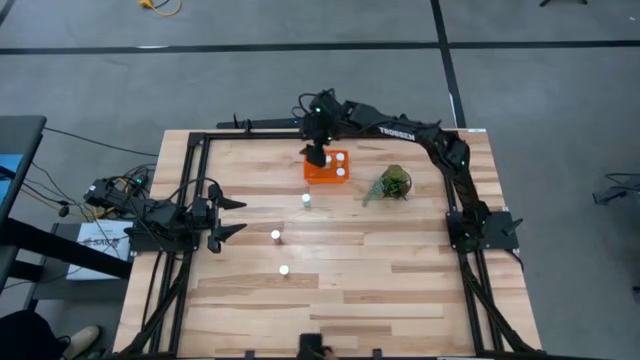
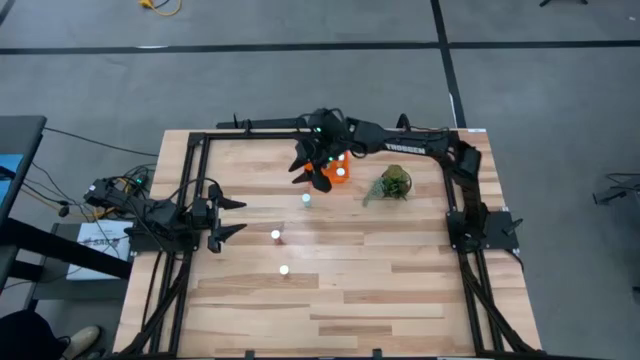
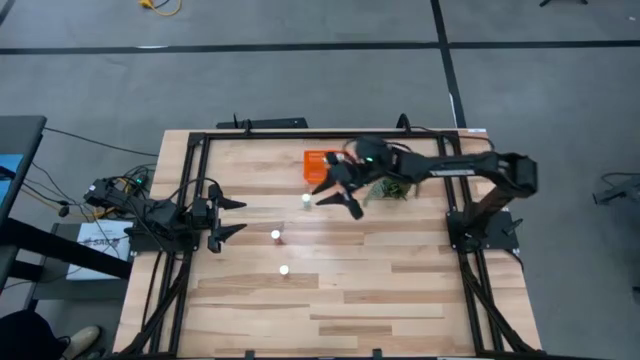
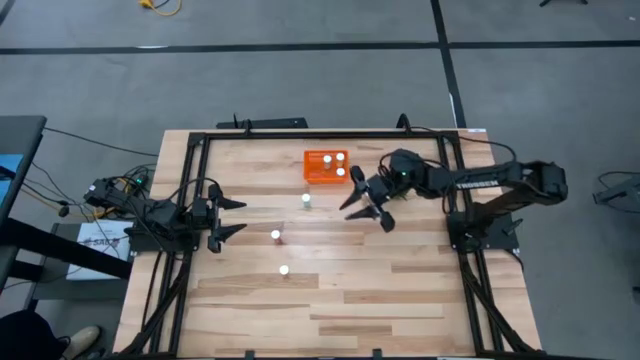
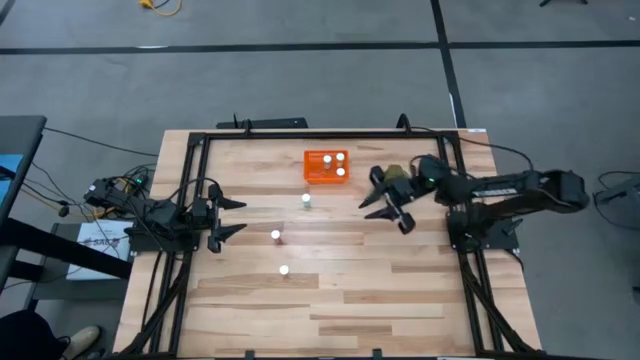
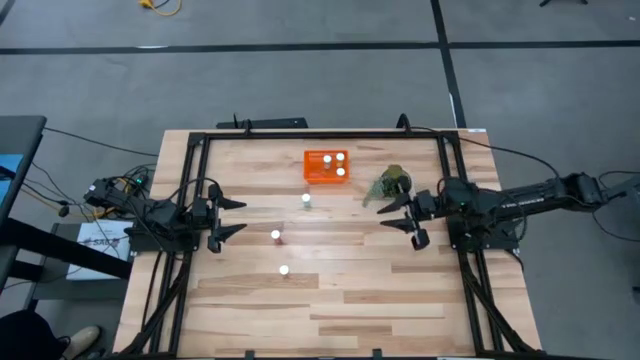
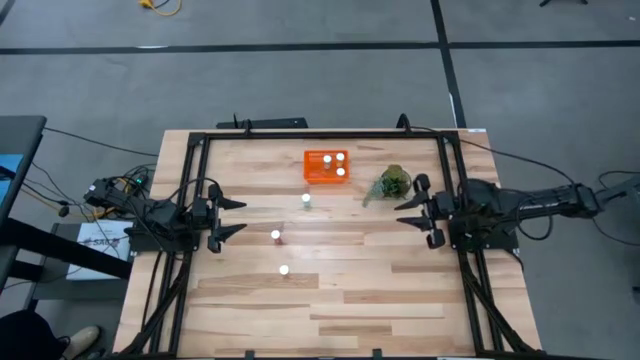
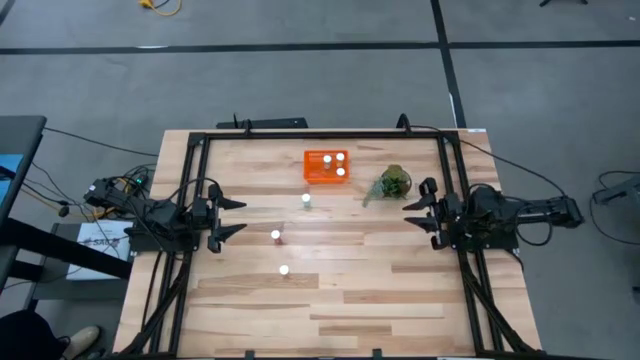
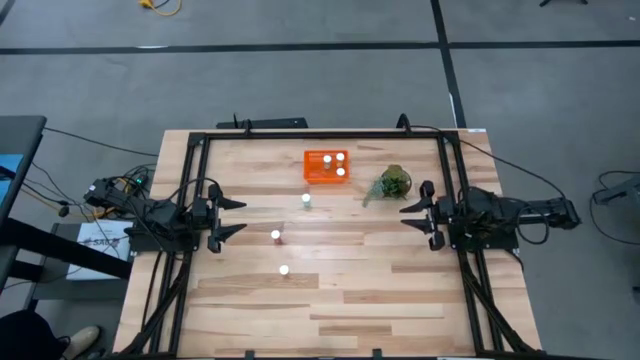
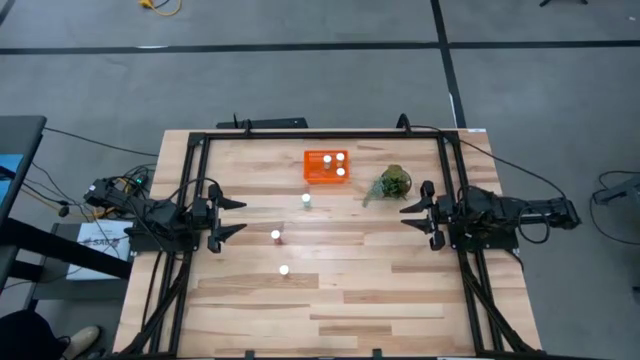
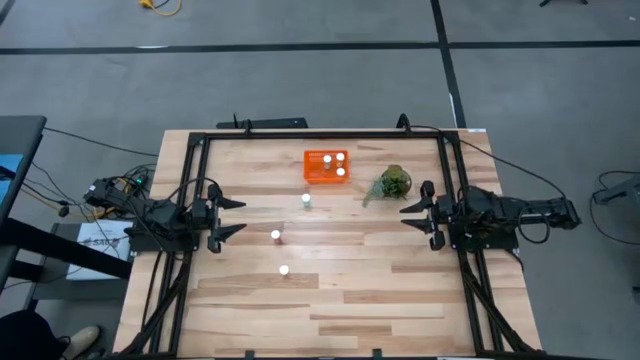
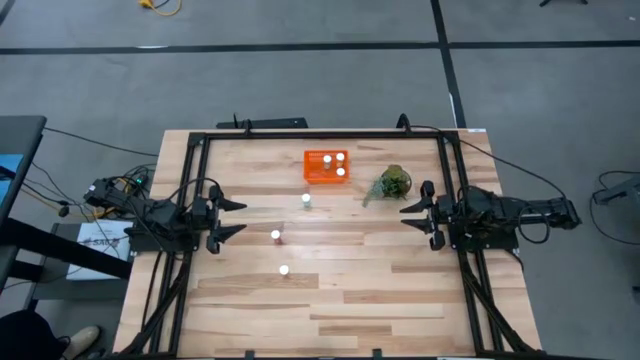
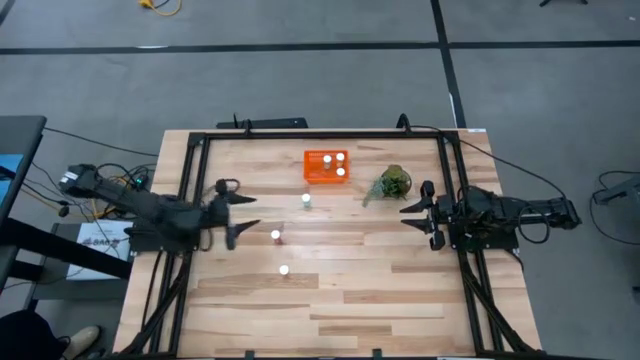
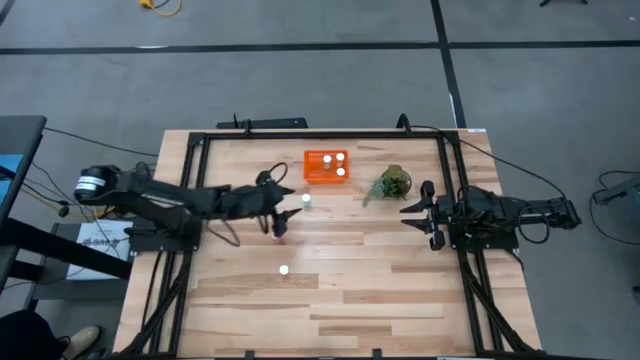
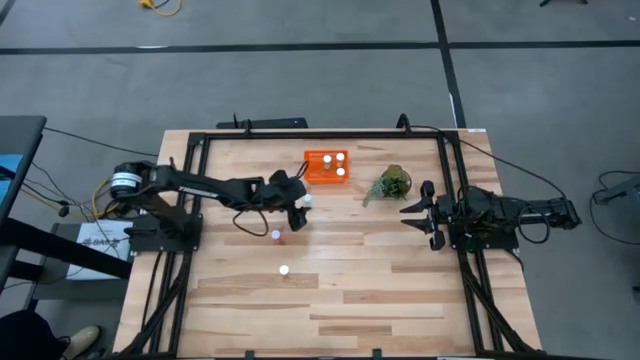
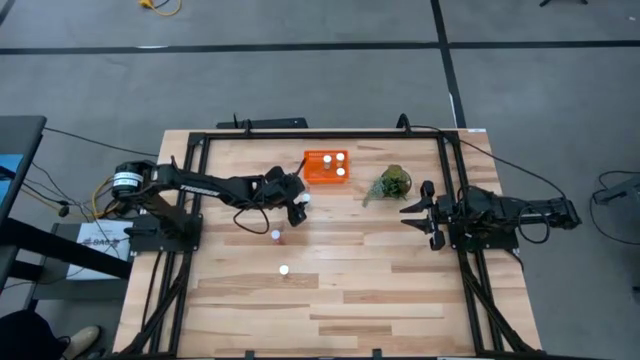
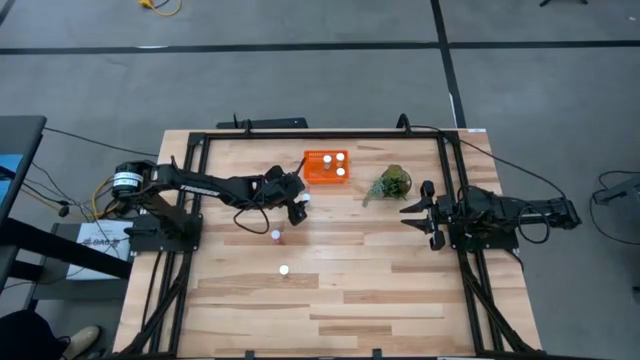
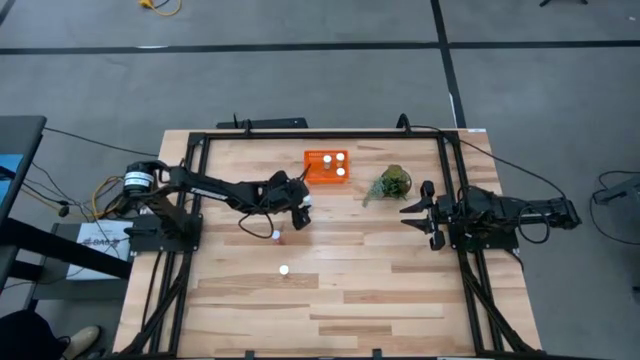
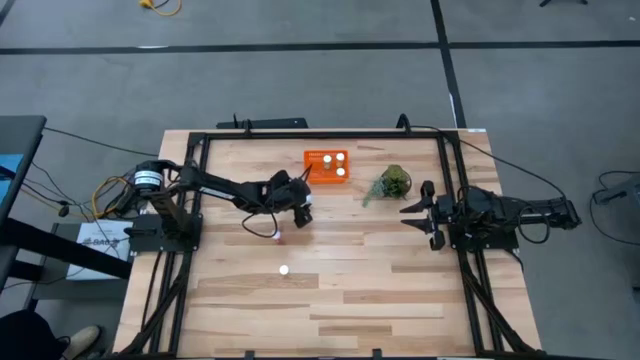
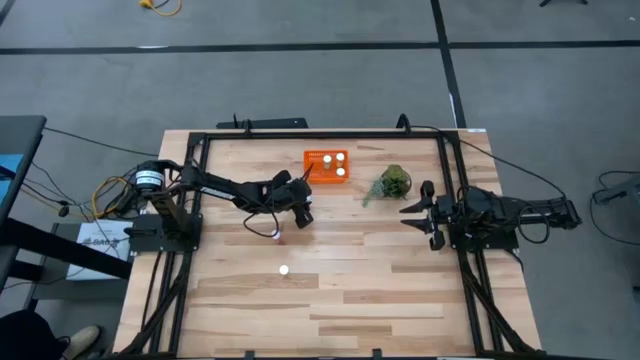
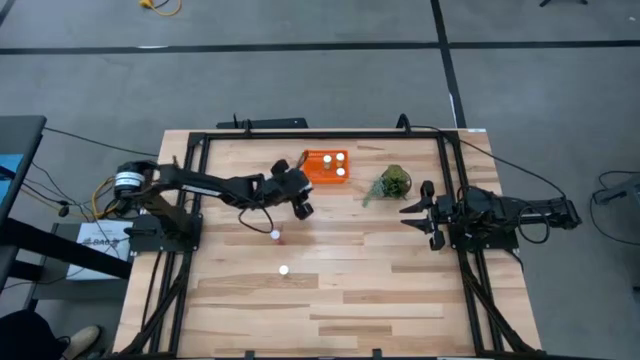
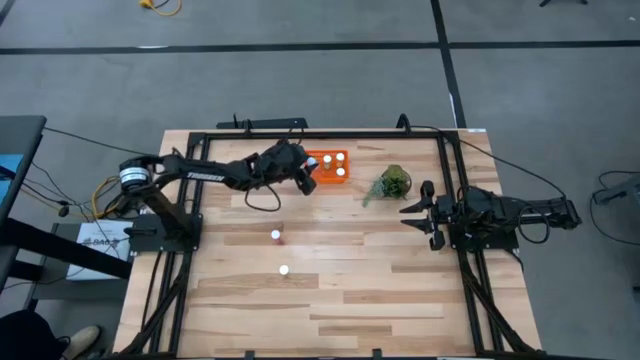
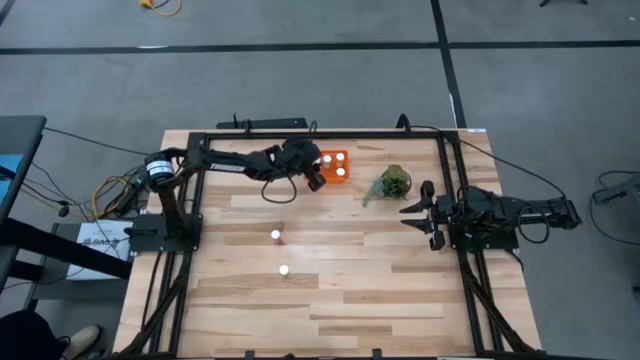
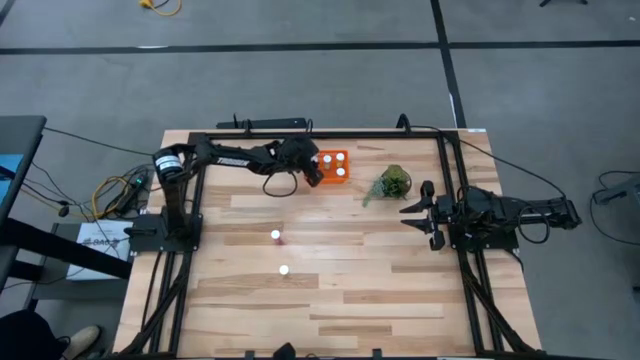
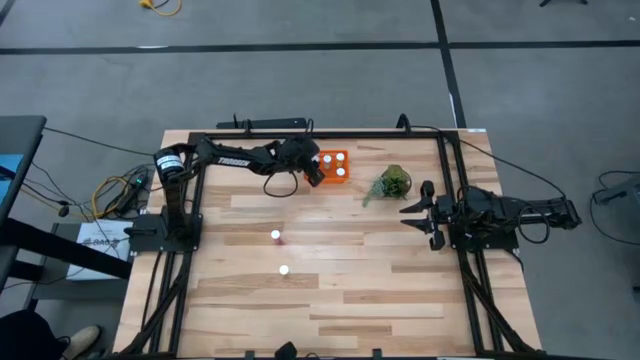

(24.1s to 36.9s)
Task: Pick and place pill bottles into a basket
Put the blue pill bottle into the orange bin

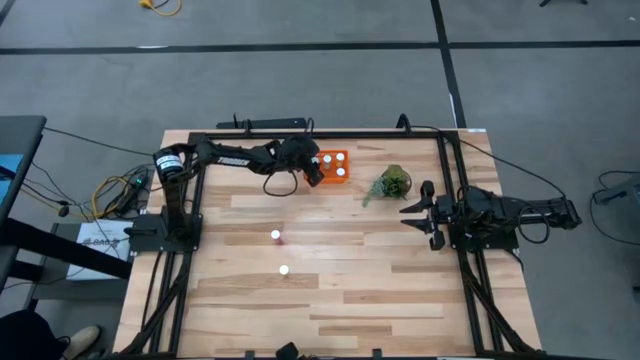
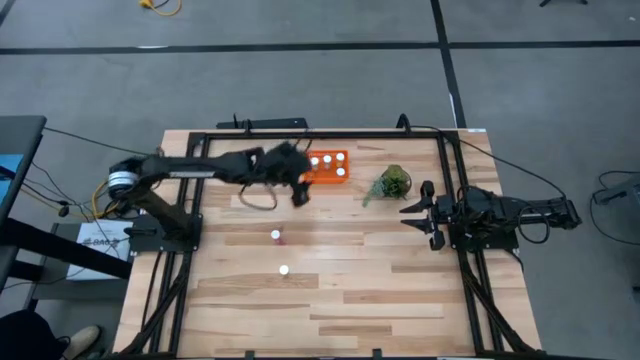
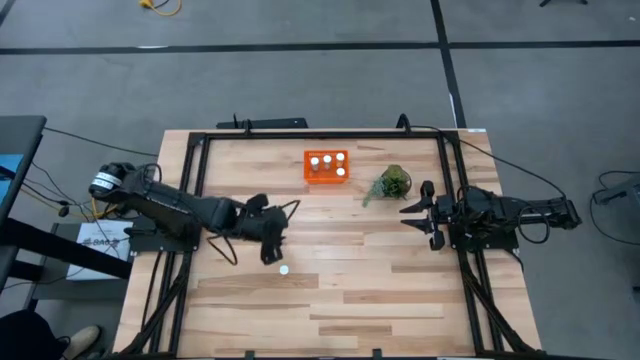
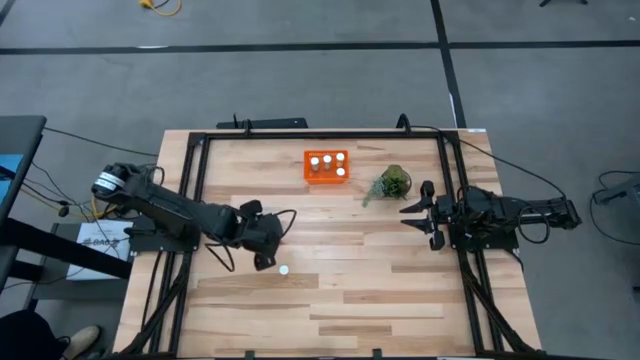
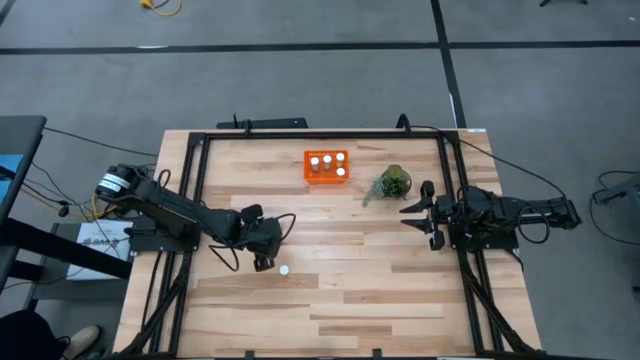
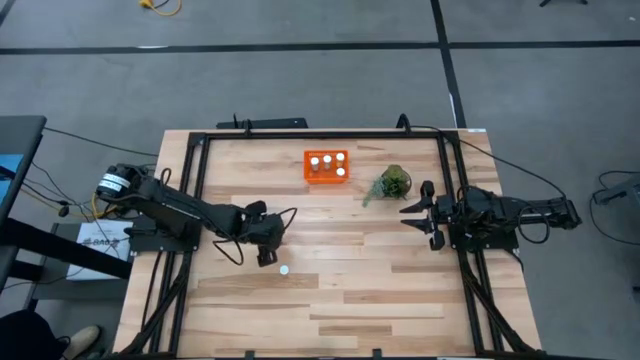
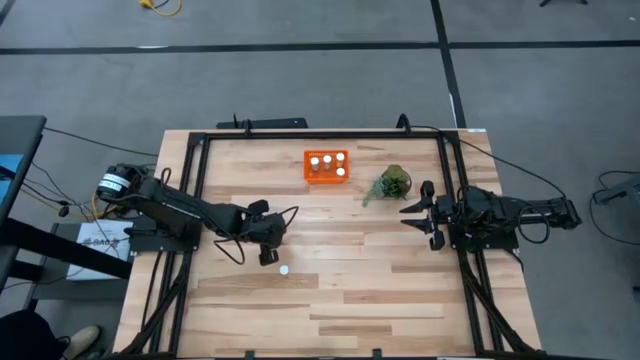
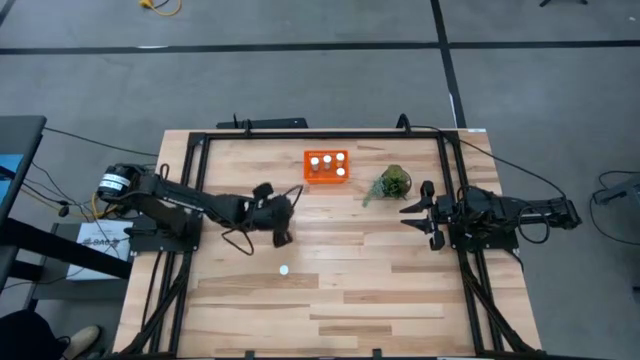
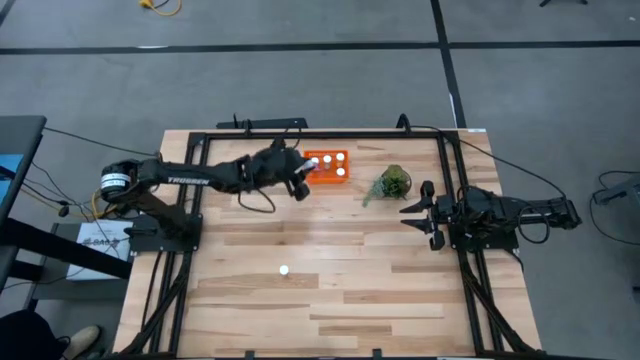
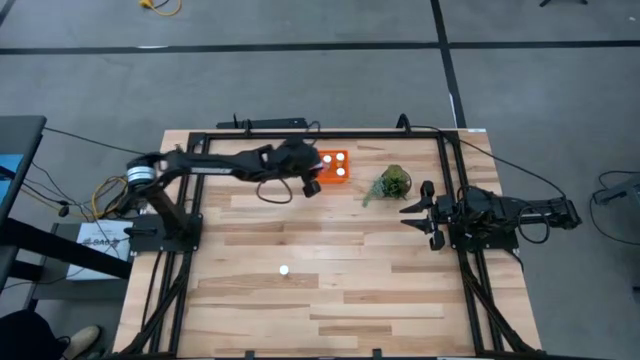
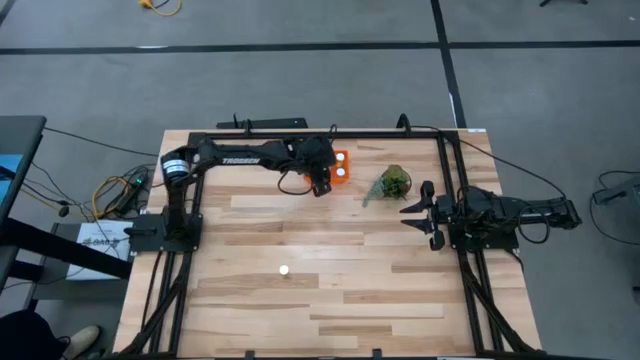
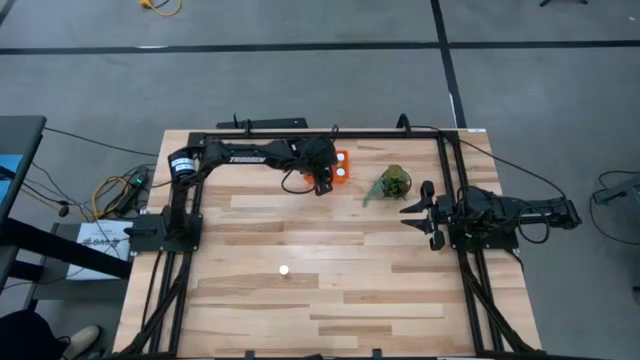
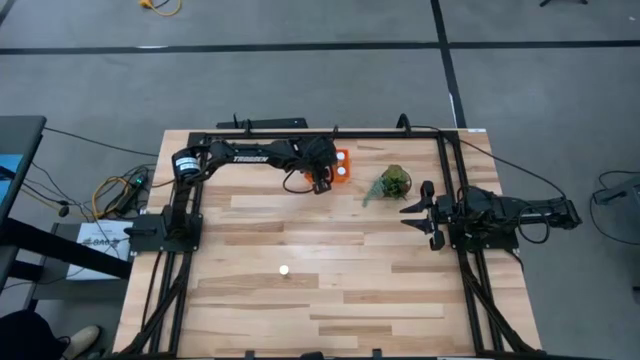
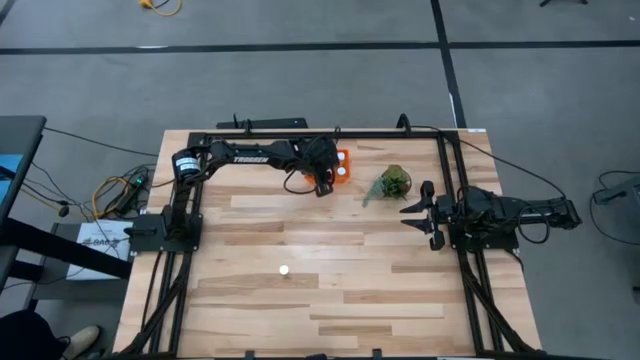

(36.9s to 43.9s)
Put the pink pill bottle into the orange bin

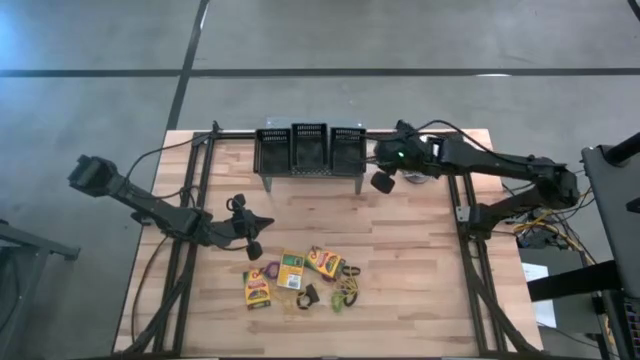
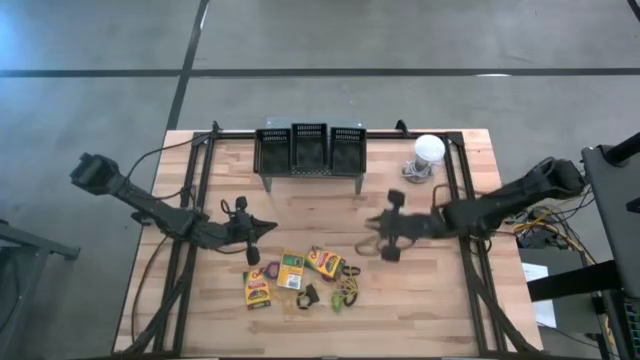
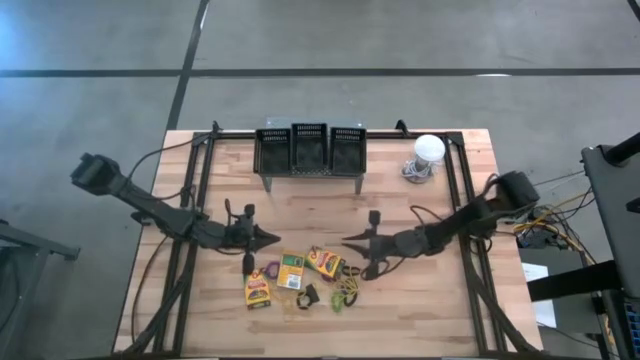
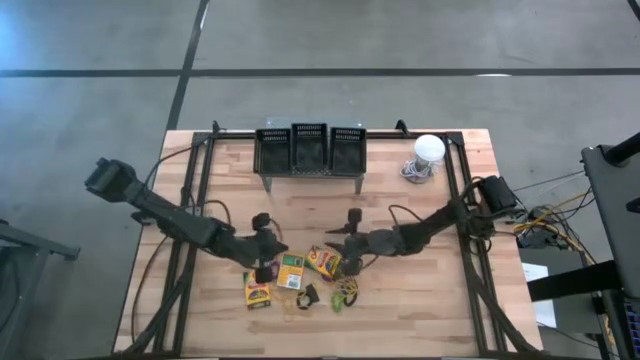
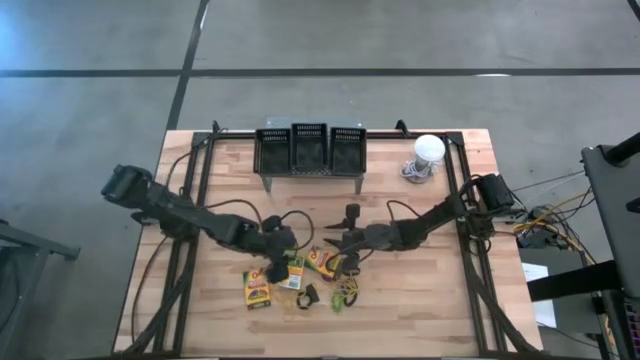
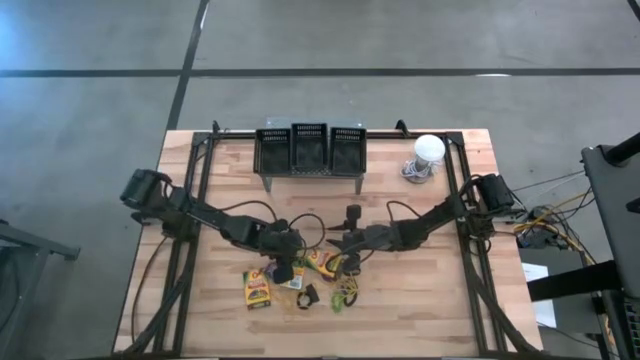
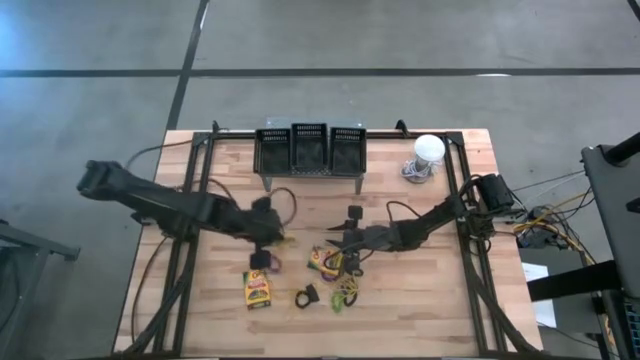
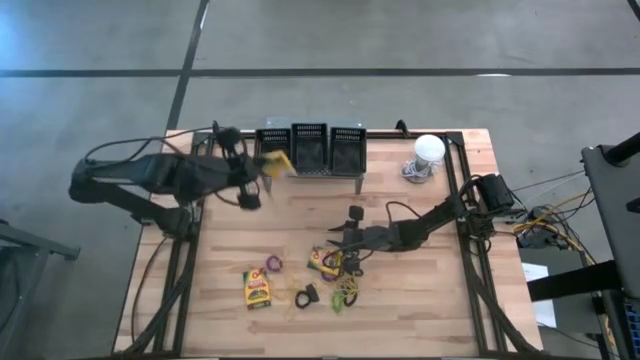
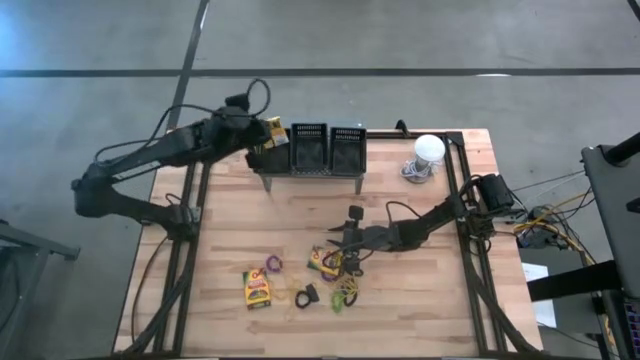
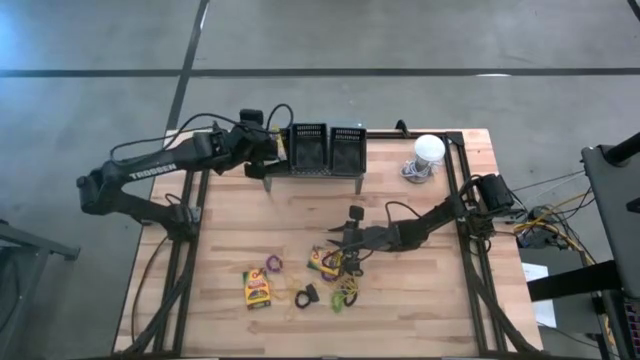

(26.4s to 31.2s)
Task: Pick & Place Office Desk Supplies
Put the yellow crayon box into the left black basket
